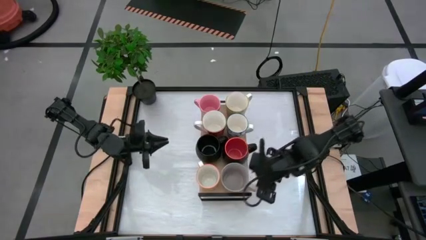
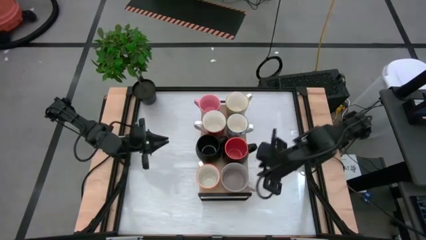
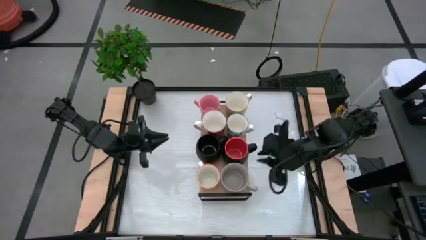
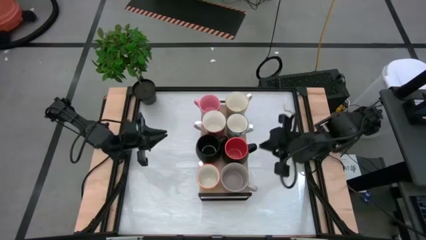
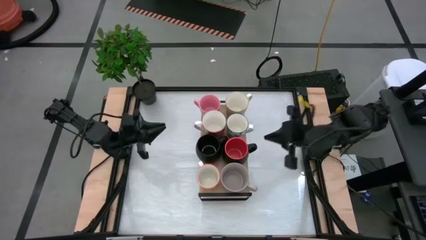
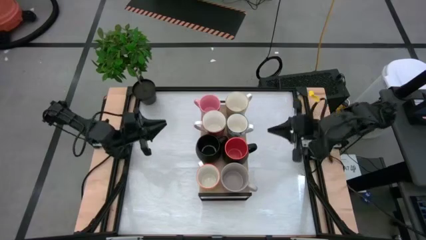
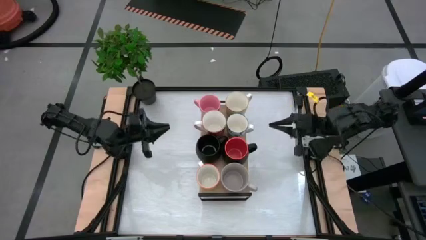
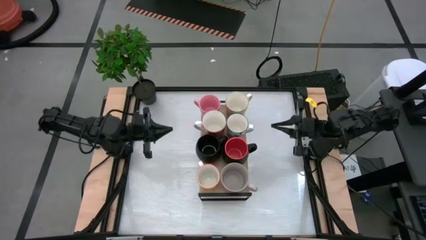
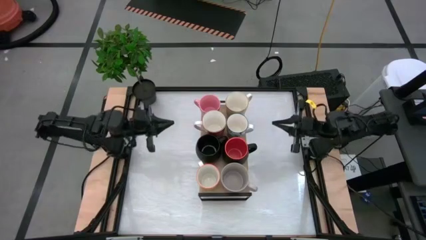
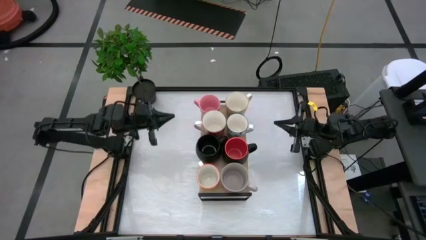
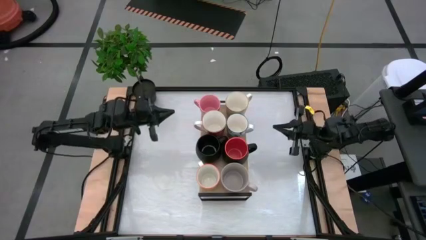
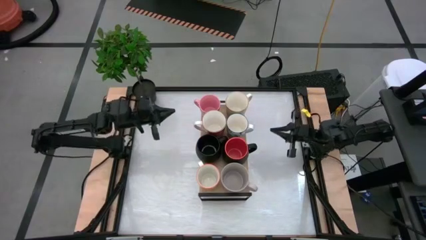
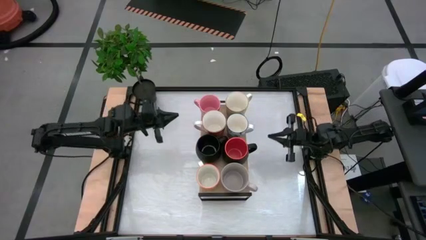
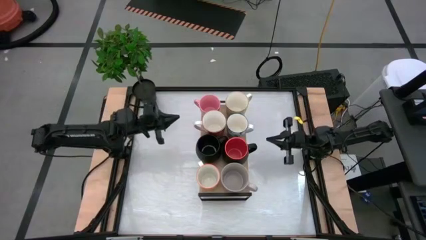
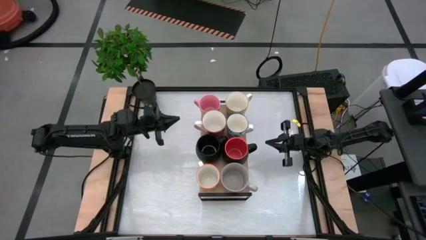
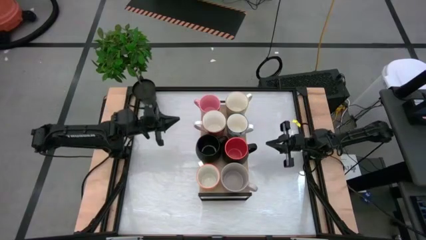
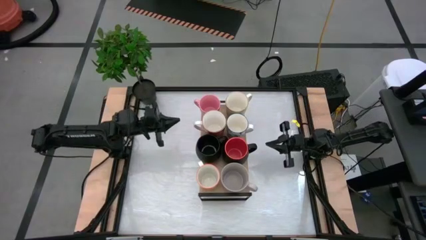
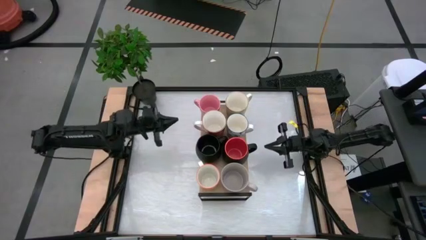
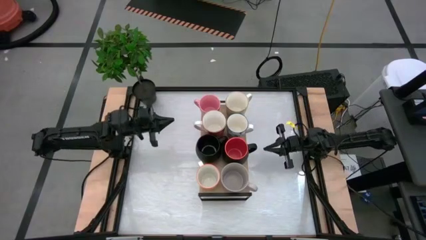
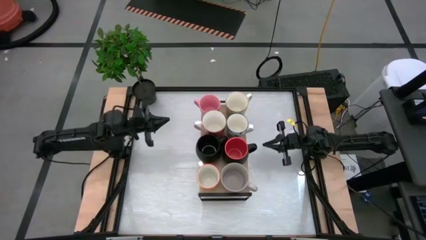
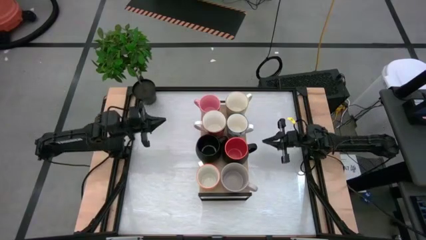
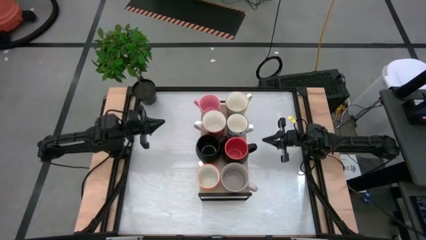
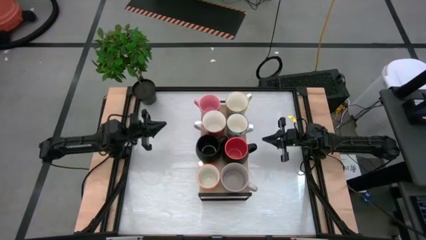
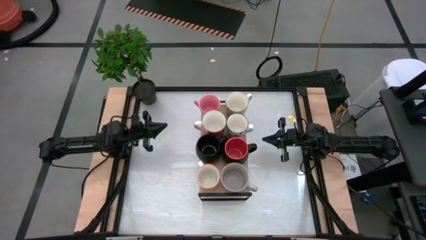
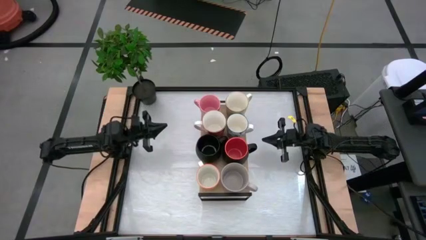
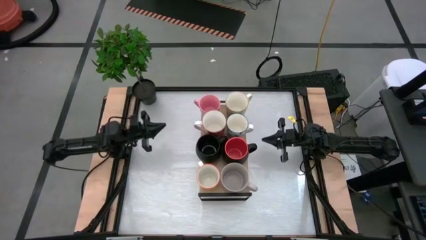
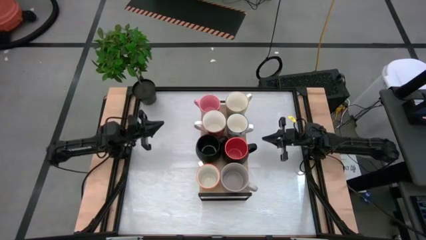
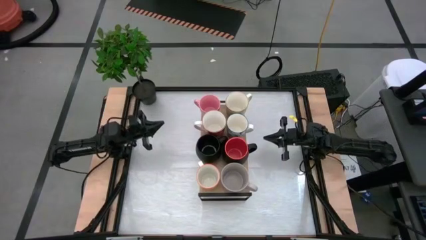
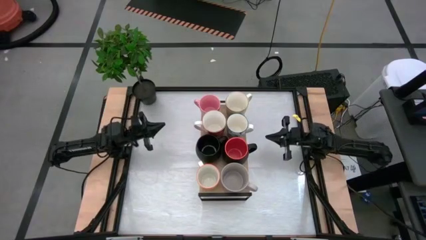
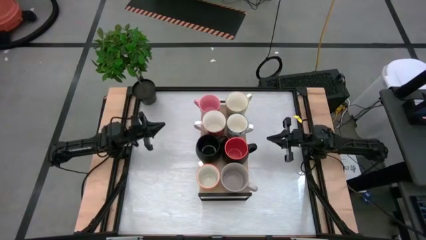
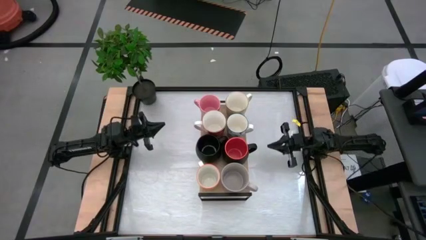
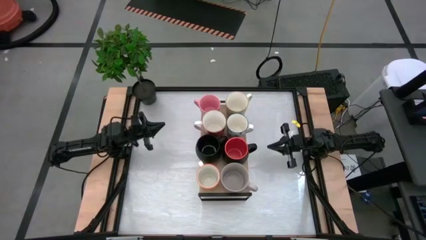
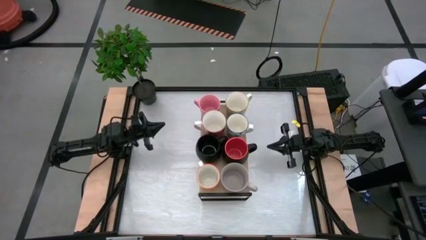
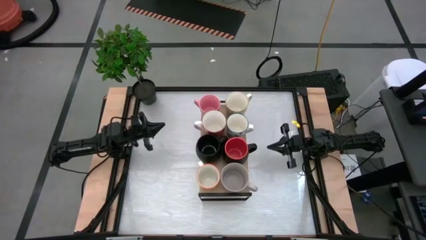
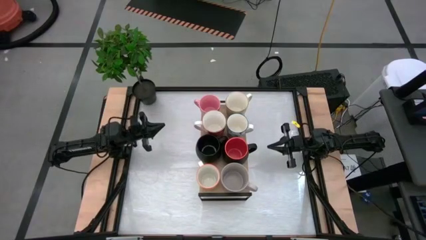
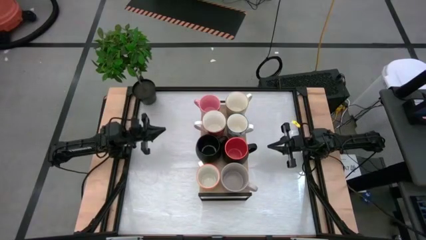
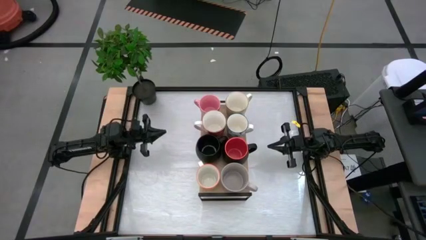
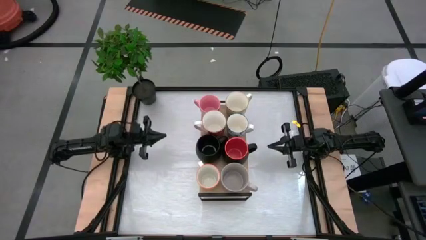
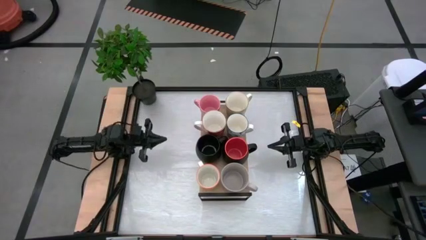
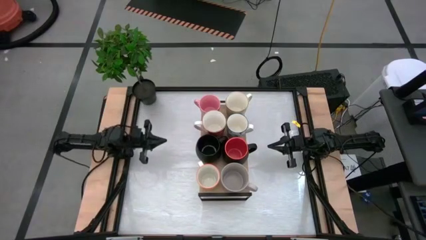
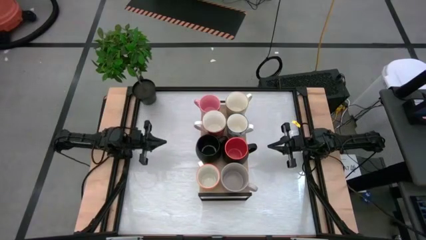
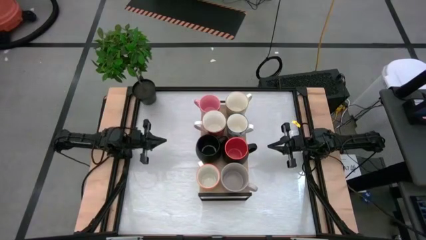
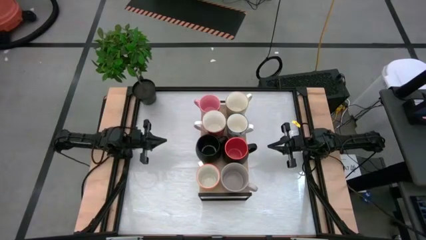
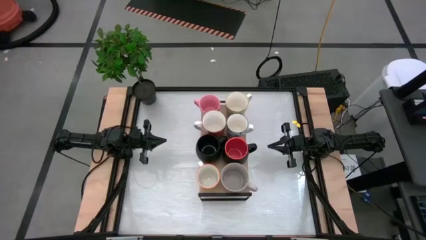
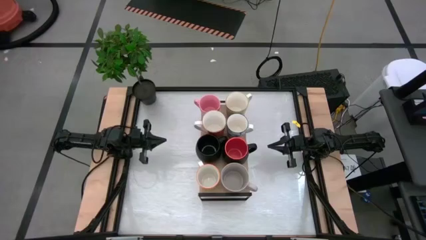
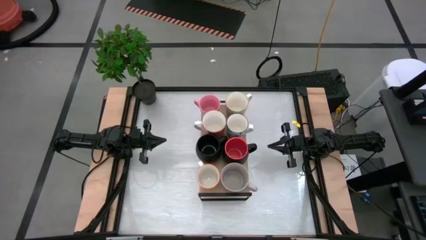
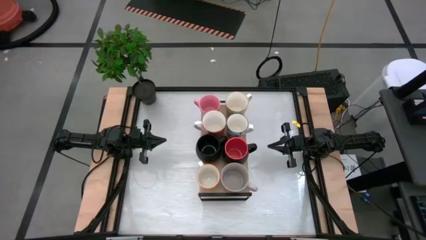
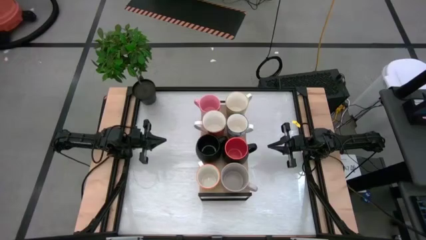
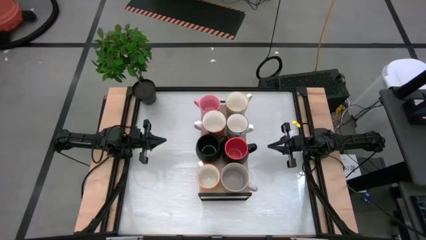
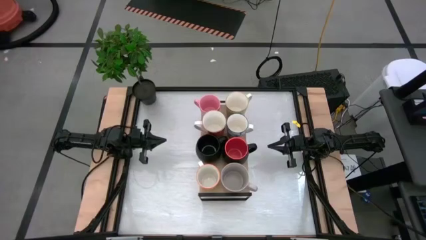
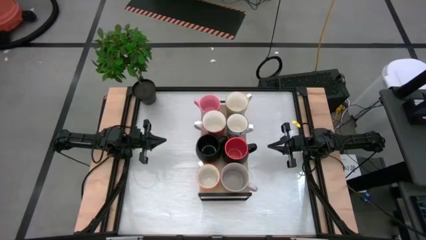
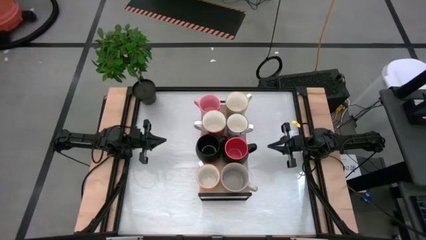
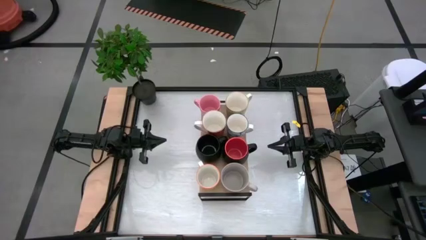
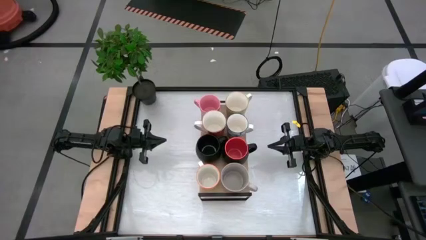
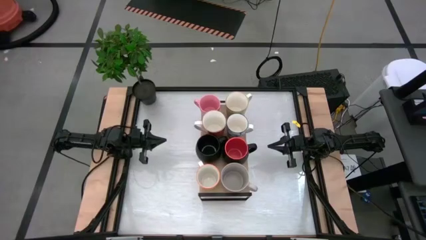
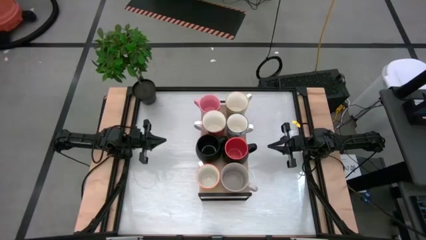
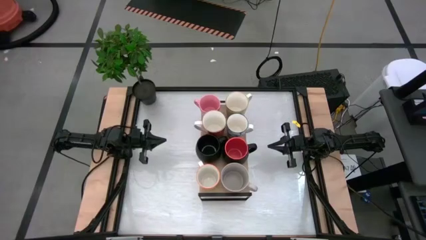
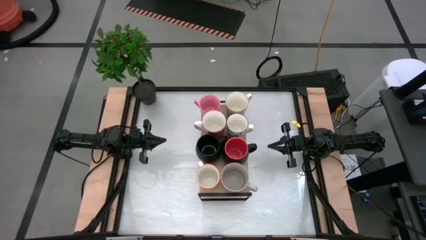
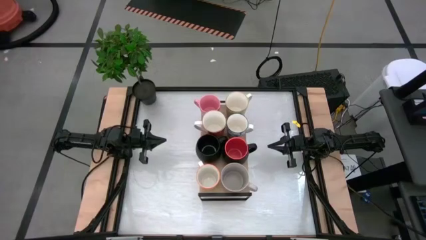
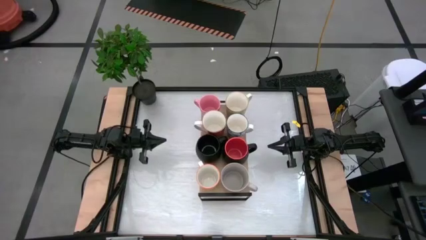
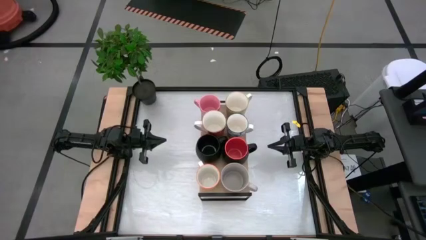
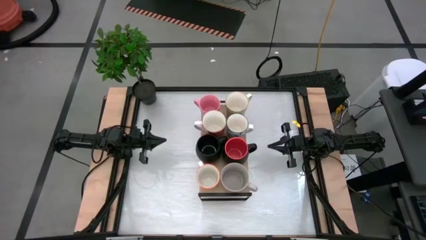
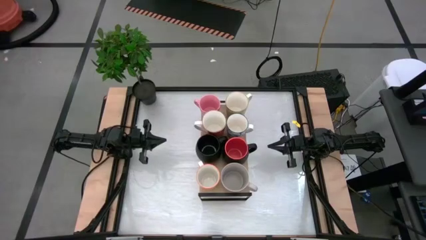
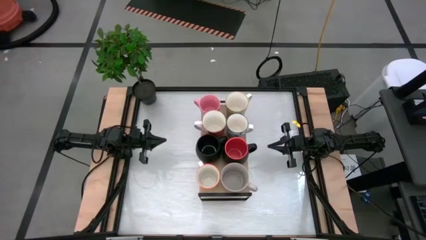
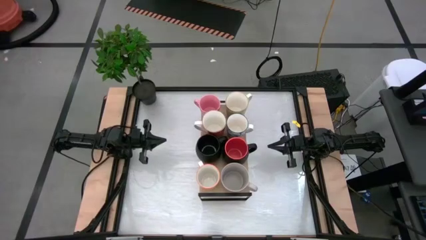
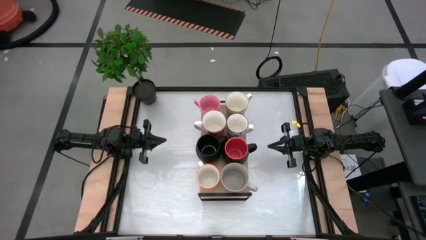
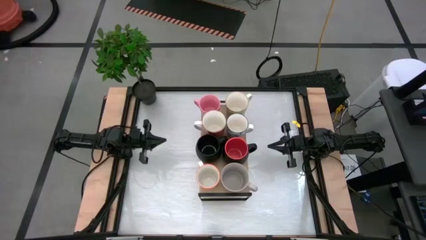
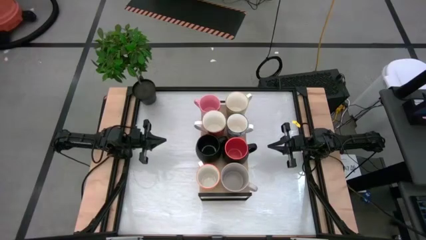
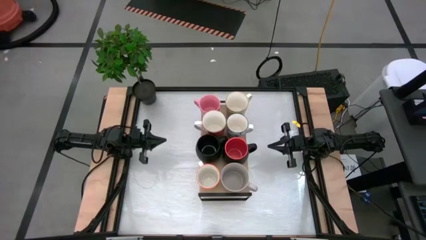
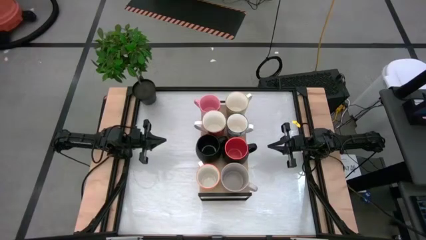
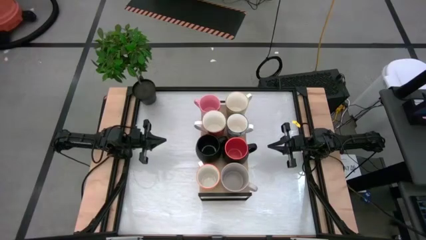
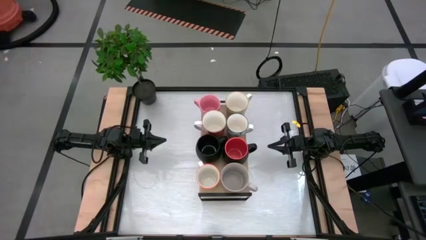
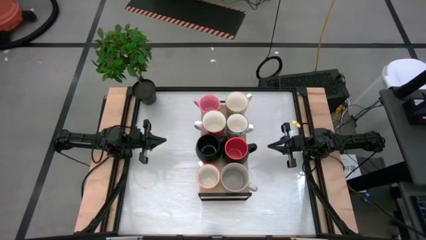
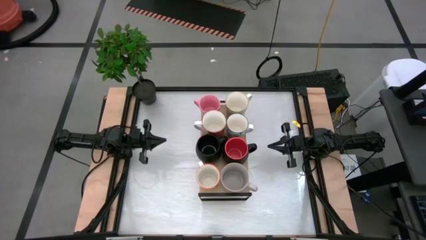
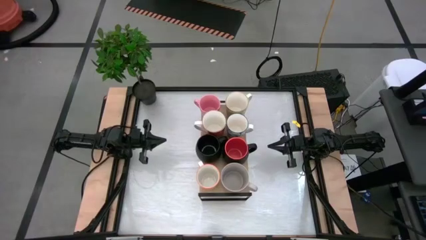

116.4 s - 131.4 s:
Task: Place coffee mugs
Return to Home Position
